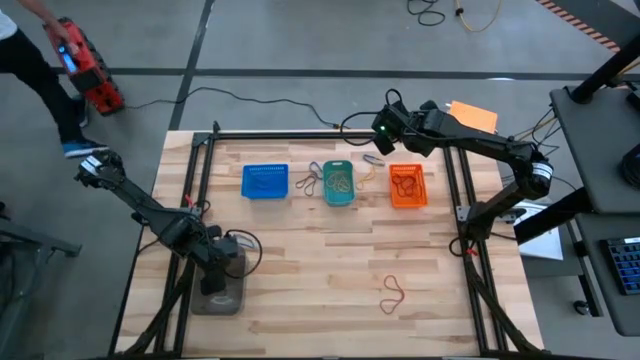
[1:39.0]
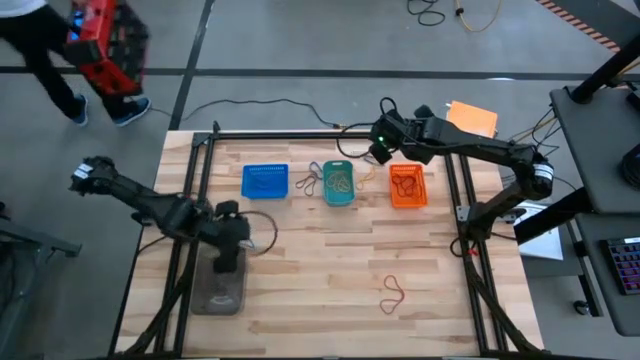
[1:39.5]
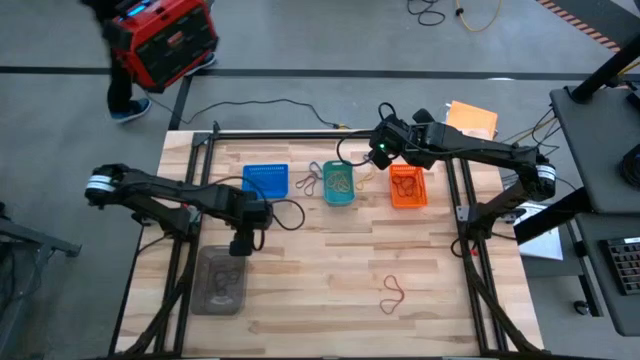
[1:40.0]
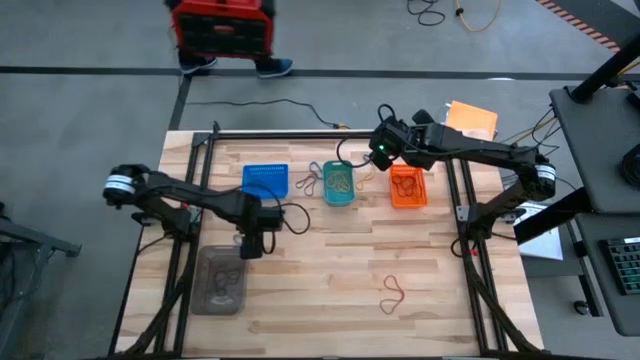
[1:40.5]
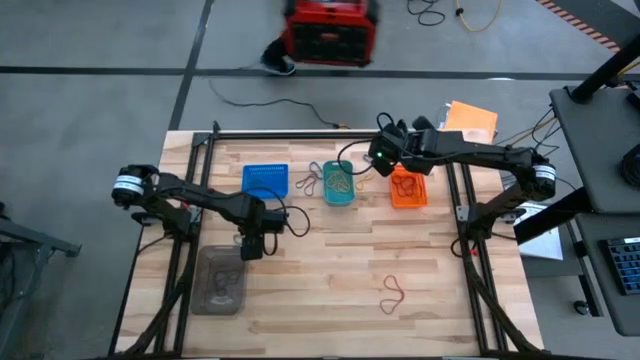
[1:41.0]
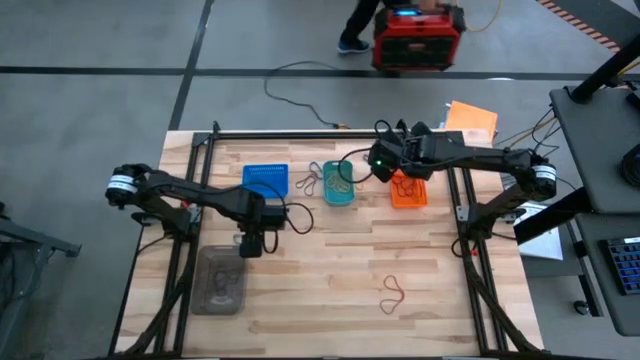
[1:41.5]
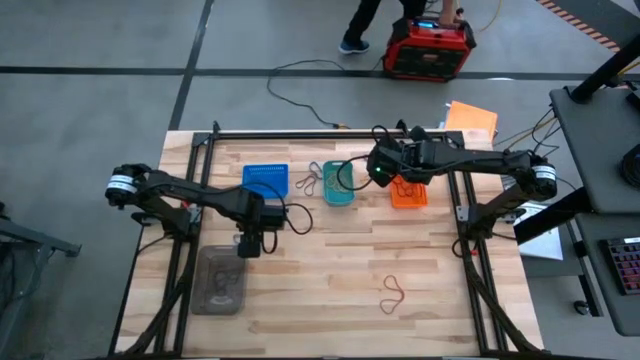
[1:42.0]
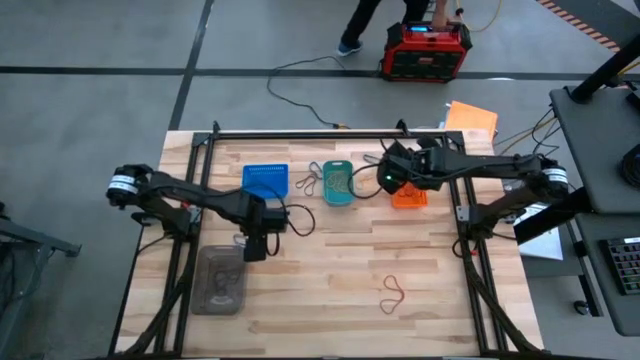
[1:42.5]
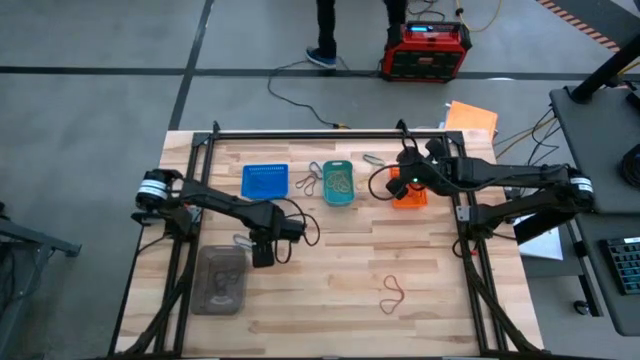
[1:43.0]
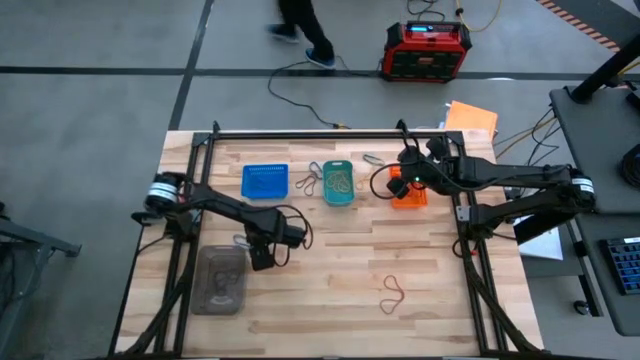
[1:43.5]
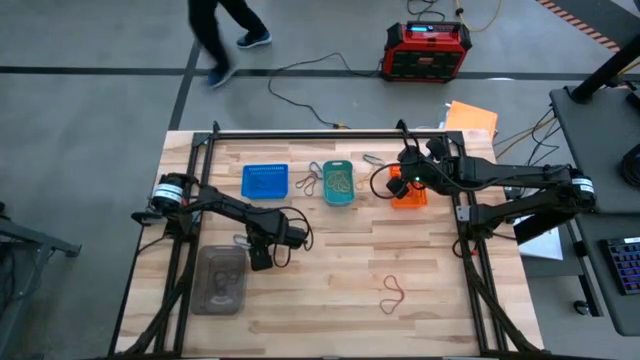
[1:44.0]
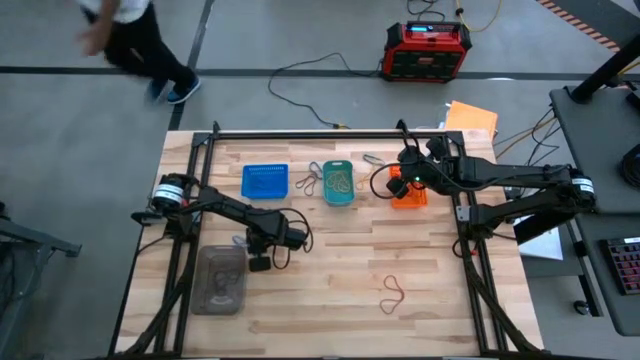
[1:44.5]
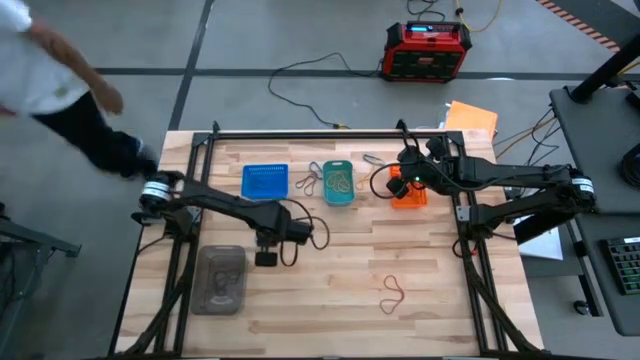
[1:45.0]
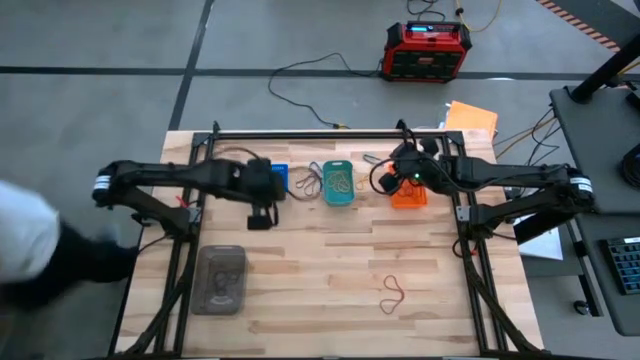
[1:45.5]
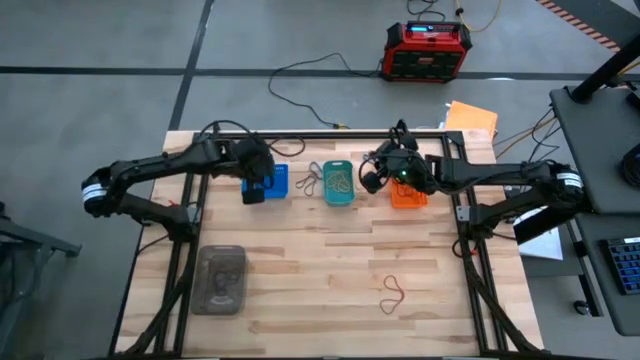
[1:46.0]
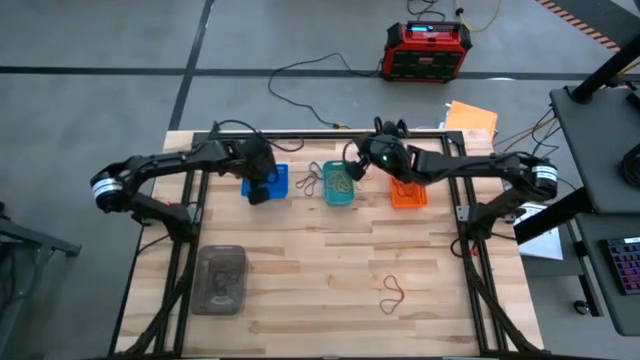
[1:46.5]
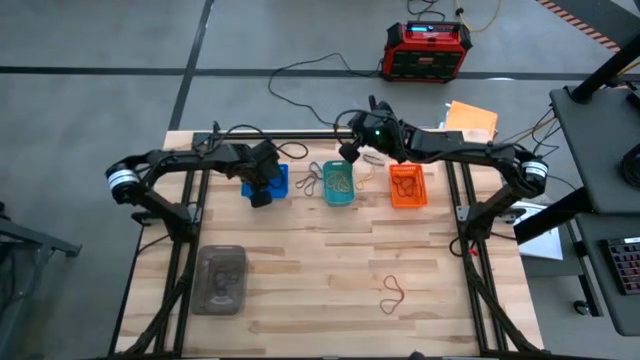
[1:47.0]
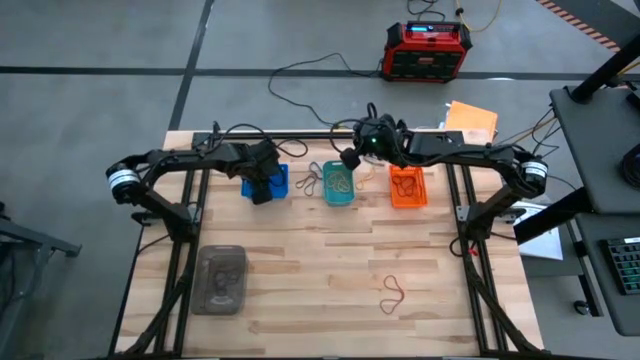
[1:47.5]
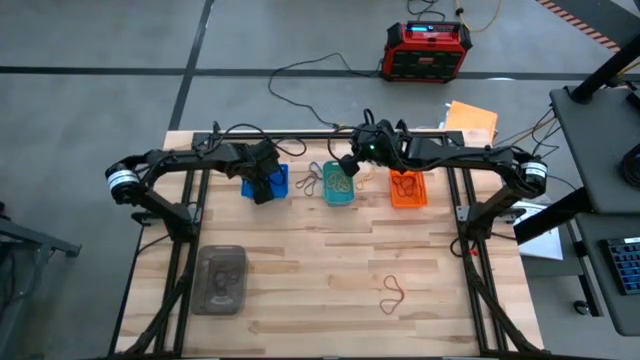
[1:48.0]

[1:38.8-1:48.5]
Task: Sort rubber bands into baskets
Put the bottom left blue rubber band into the blue bin

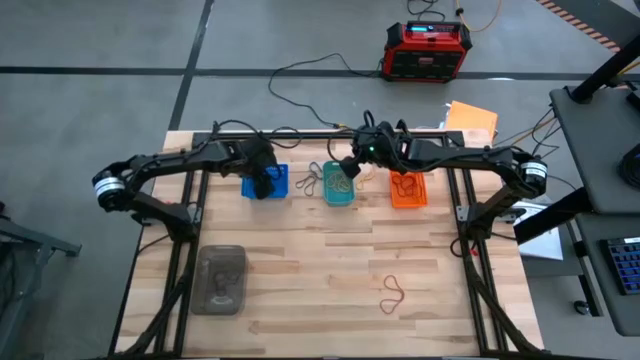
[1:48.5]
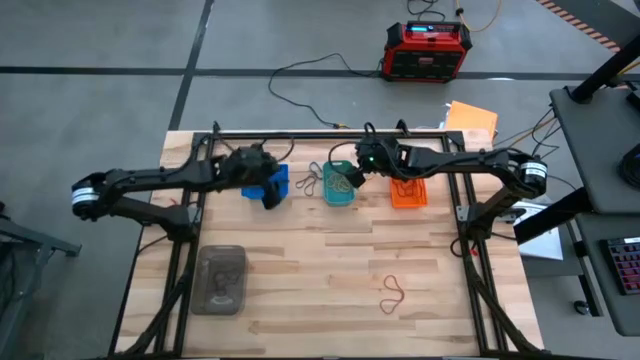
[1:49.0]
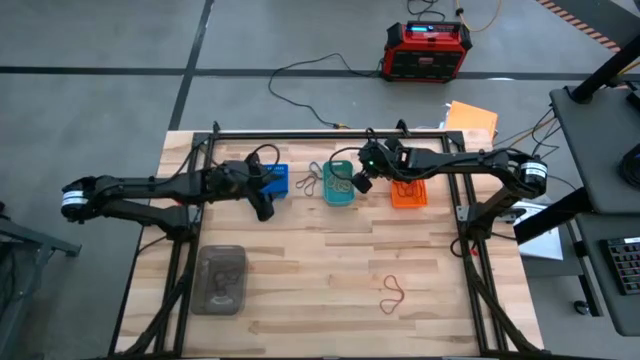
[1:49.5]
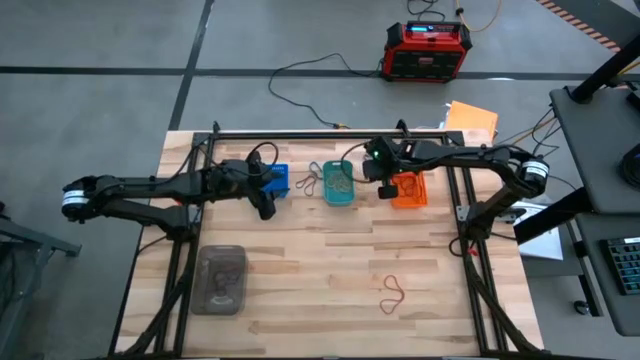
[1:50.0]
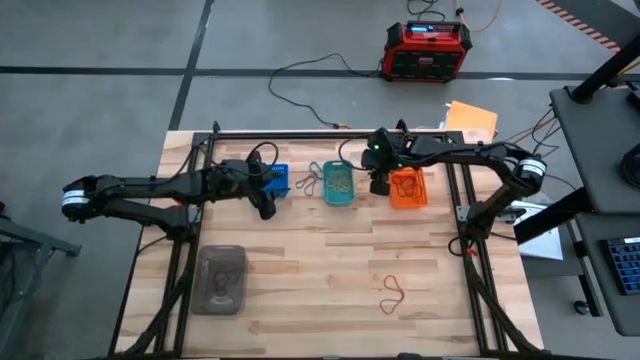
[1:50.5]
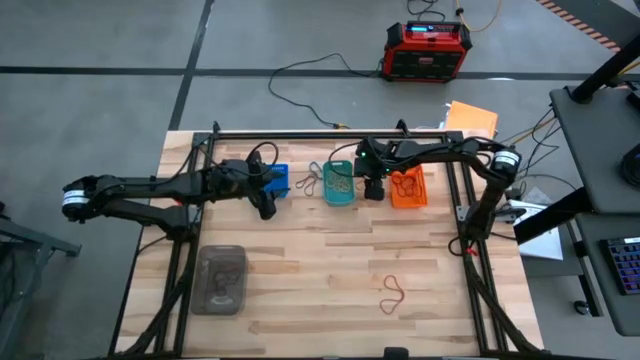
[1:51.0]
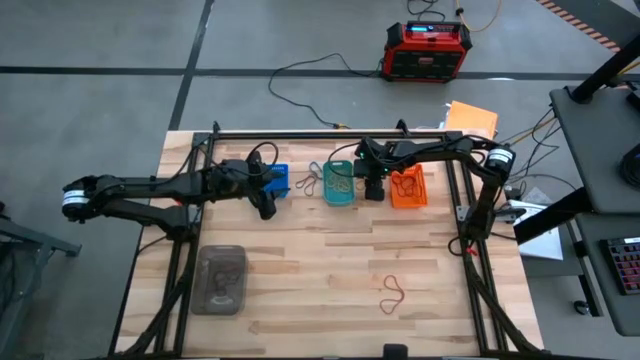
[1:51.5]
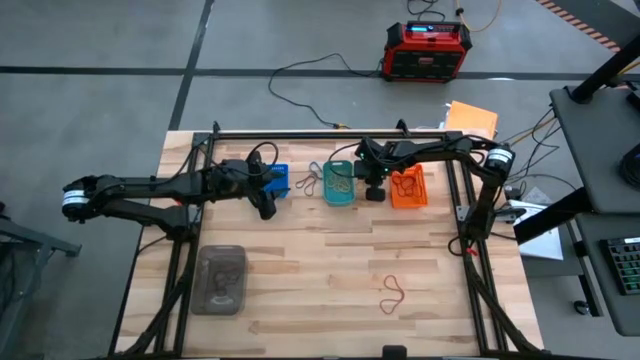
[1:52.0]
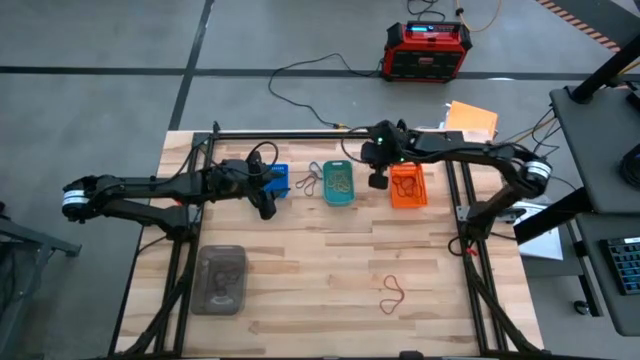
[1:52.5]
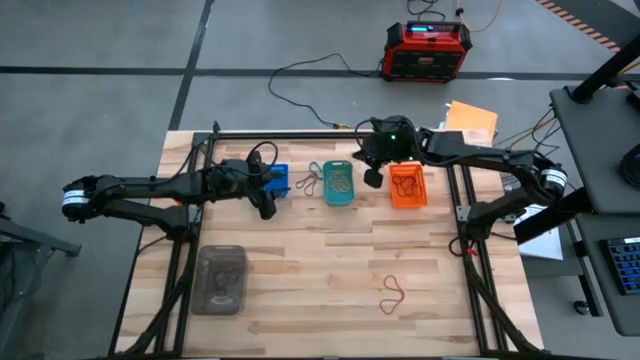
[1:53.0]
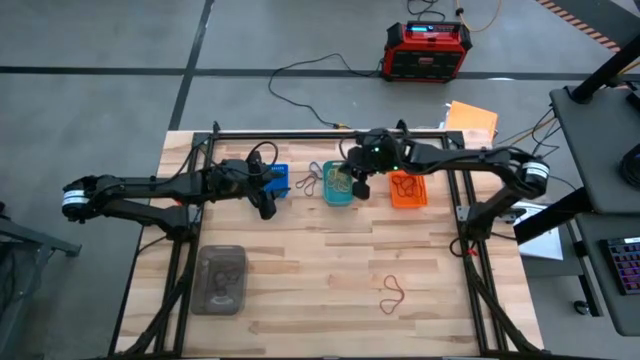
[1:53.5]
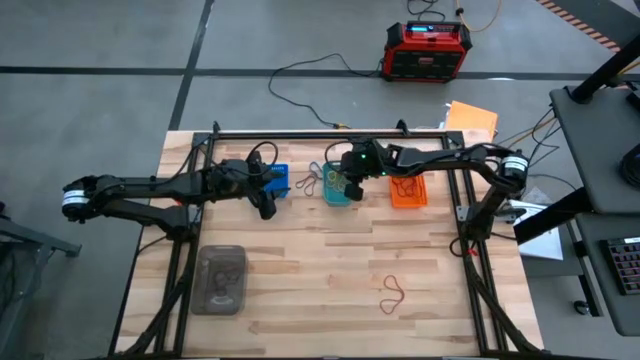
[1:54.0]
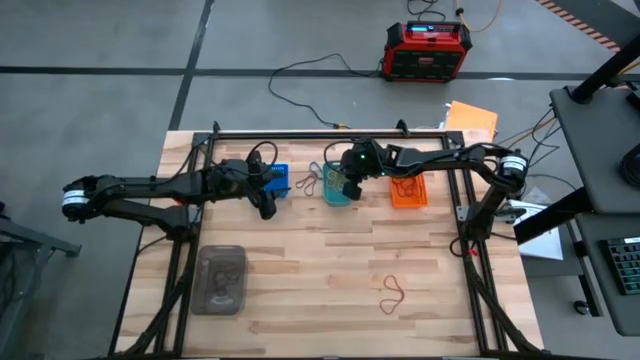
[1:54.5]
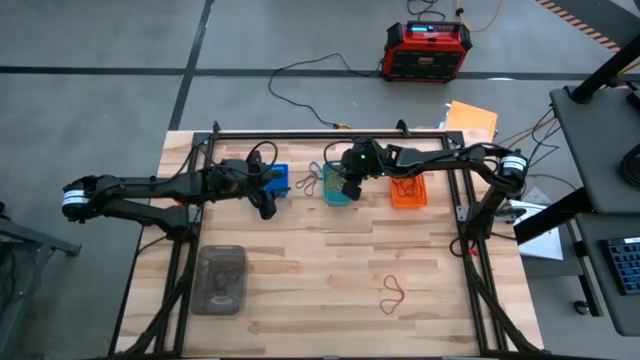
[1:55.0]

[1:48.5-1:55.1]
Put the yellow rubber band into the green bin

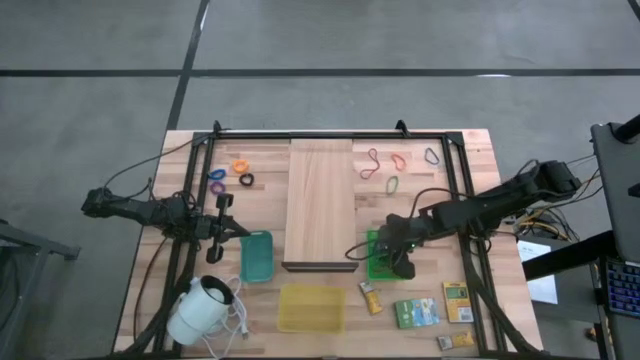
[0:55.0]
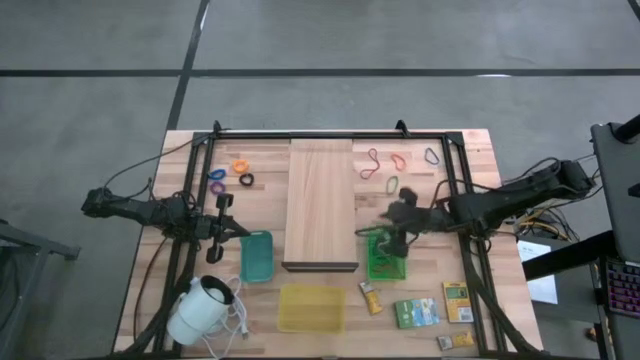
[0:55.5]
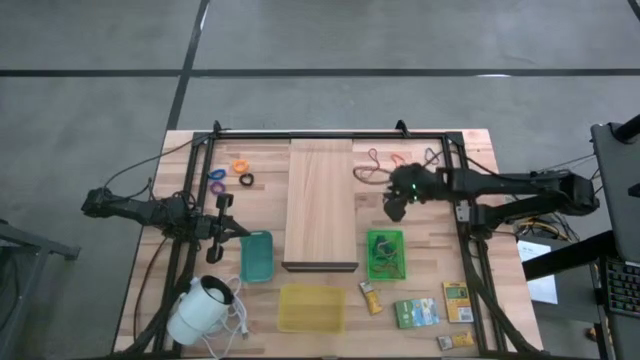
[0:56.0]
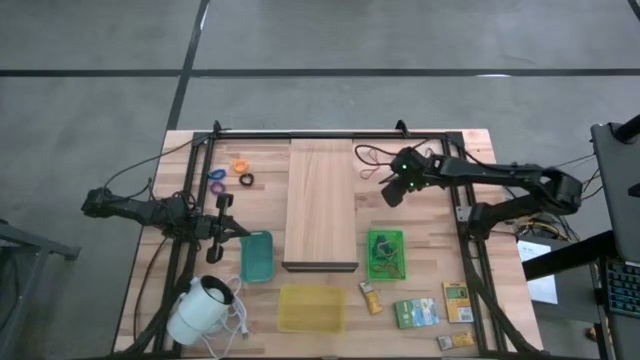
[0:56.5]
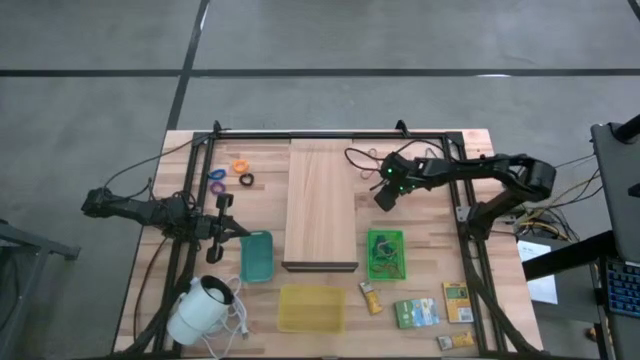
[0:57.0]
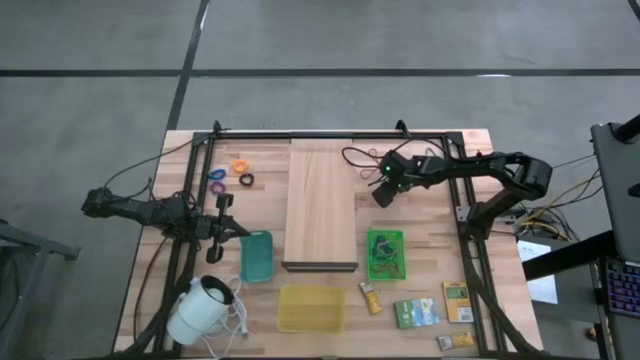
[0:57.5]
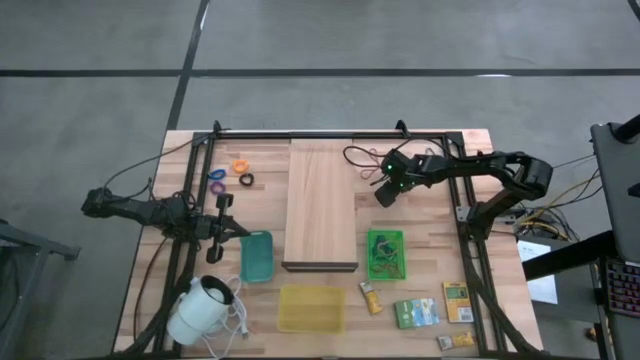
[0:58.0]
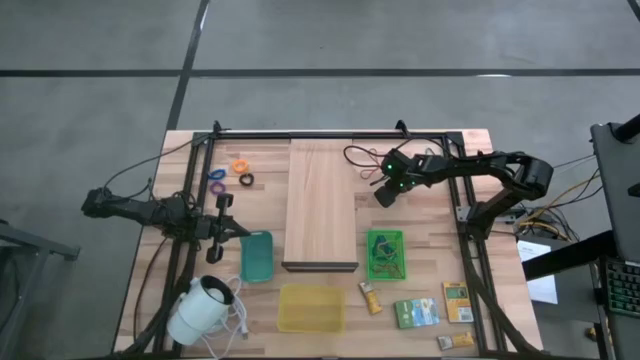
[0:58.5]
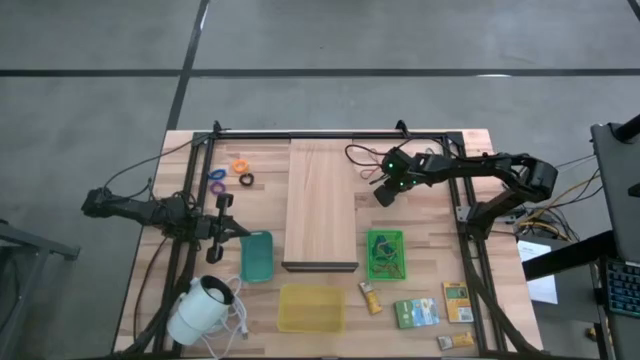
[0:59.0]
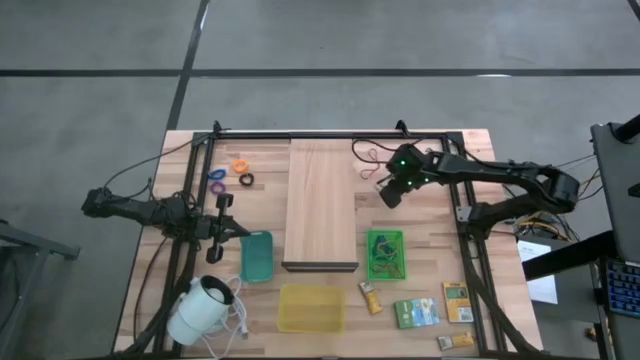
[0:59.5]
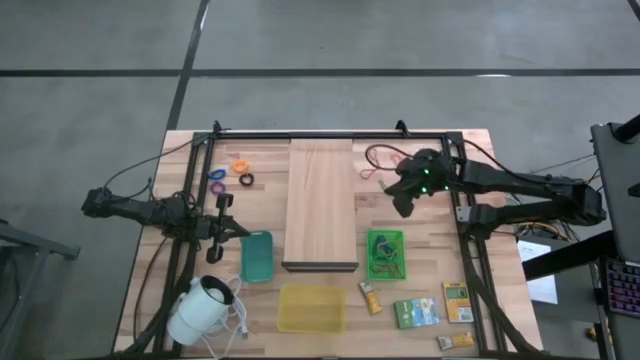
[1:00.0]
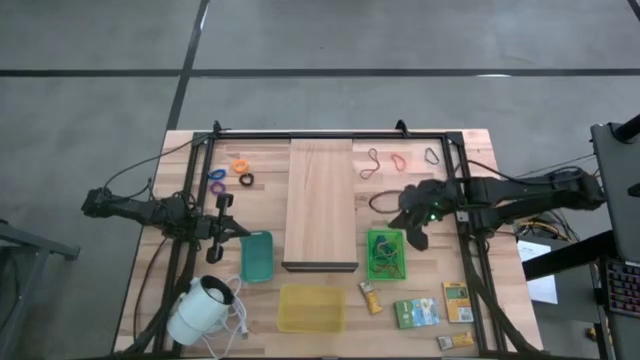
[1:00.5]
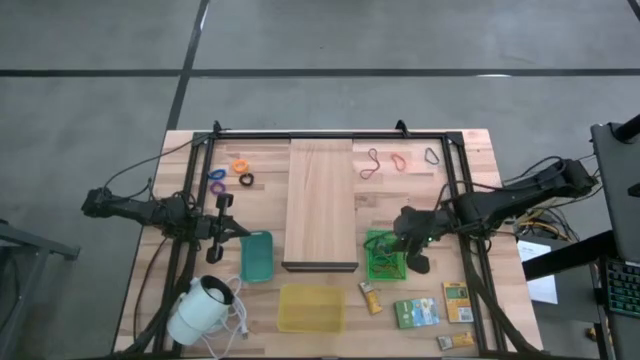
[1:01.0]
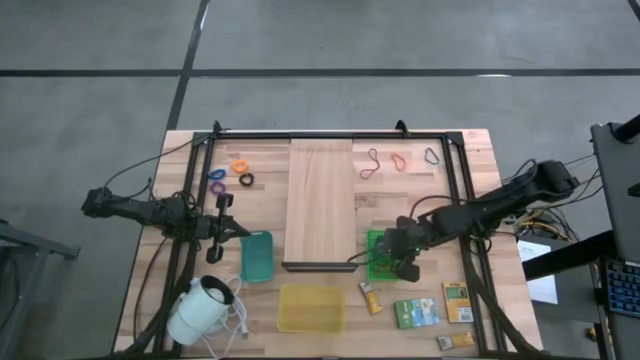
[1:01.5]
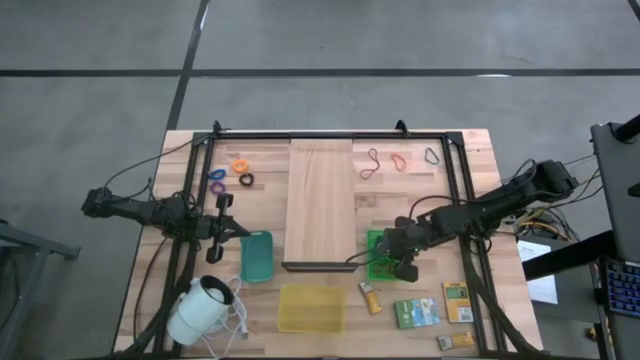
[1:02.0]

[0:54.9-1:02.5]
Task: Pick & Place Office Desk Supplies
Put the bottom green rubber band into the green bin
